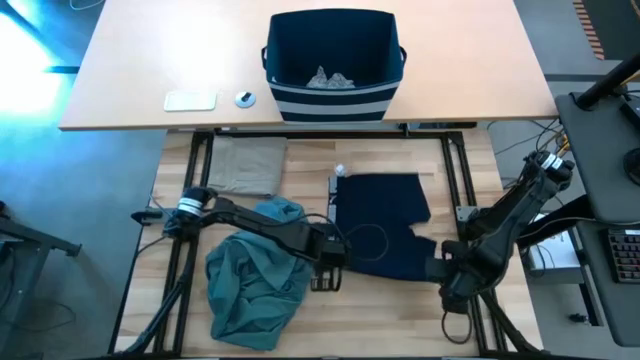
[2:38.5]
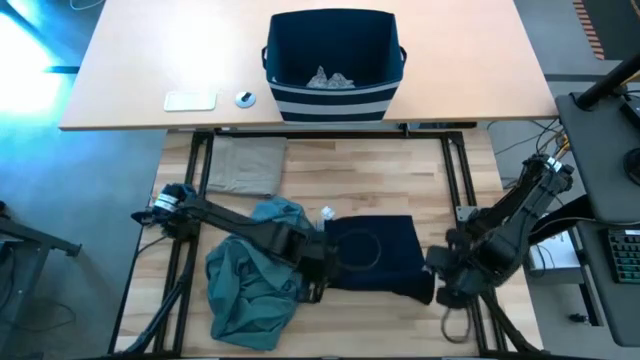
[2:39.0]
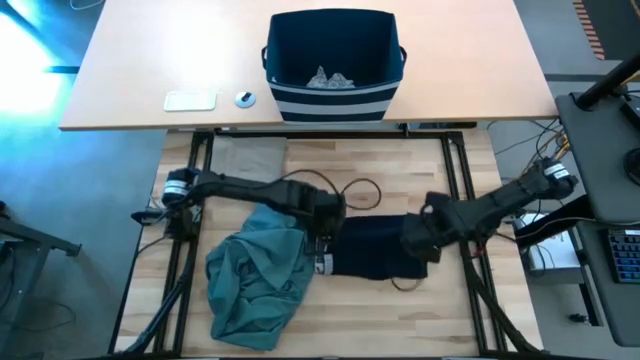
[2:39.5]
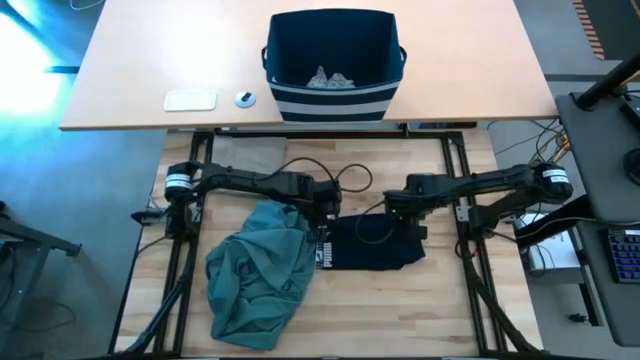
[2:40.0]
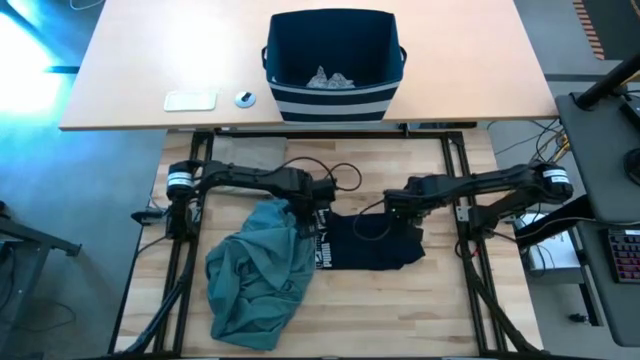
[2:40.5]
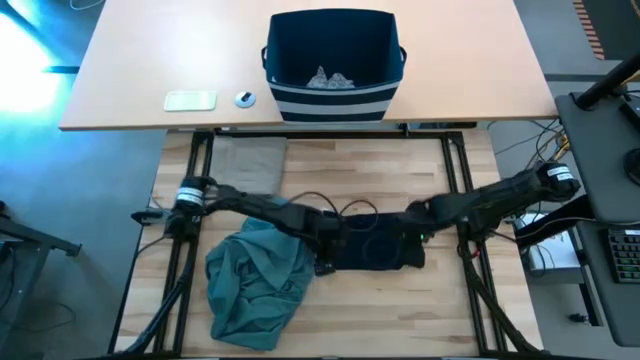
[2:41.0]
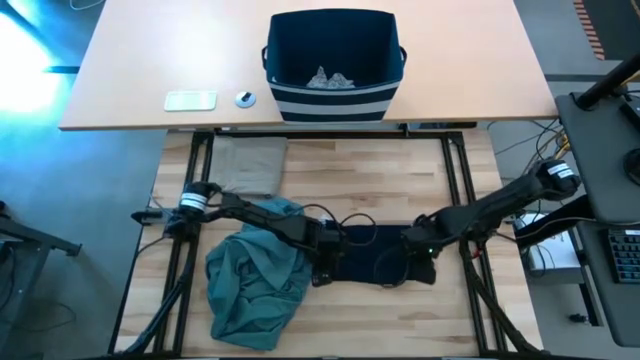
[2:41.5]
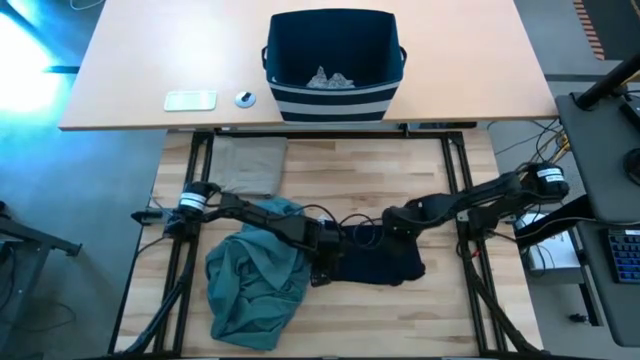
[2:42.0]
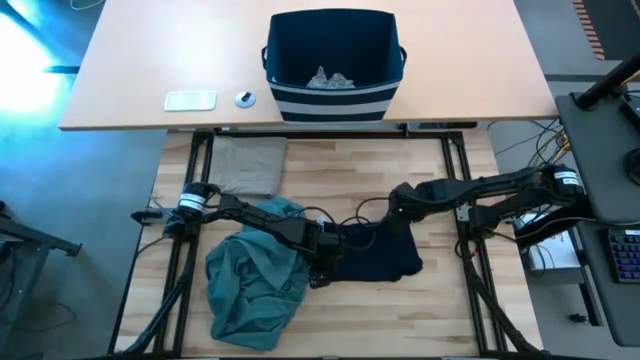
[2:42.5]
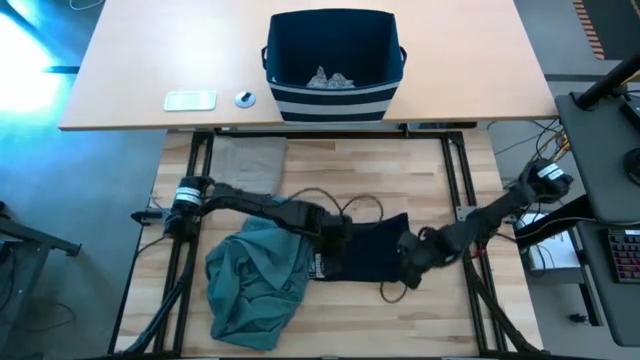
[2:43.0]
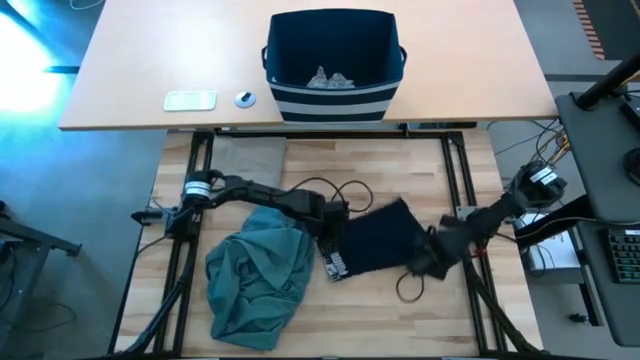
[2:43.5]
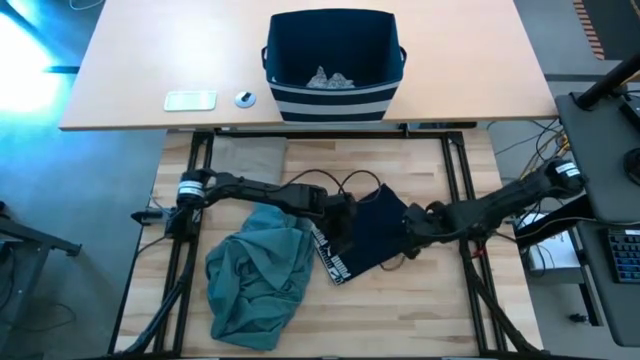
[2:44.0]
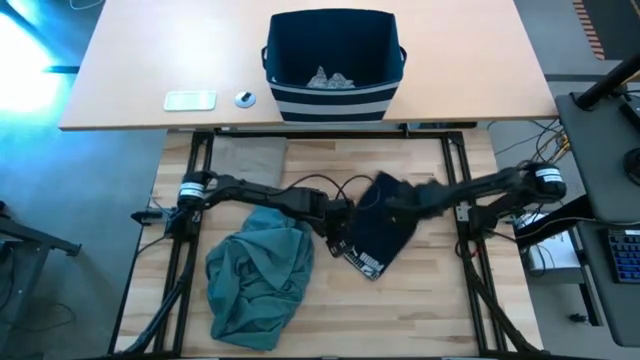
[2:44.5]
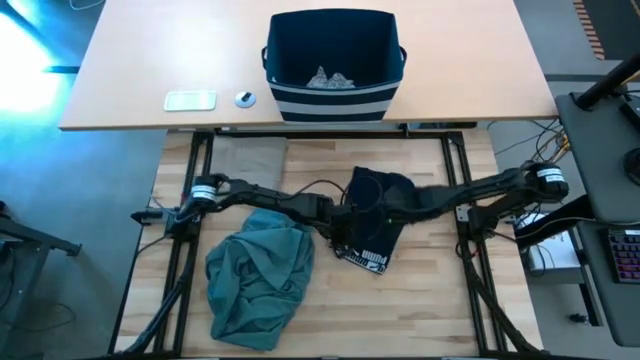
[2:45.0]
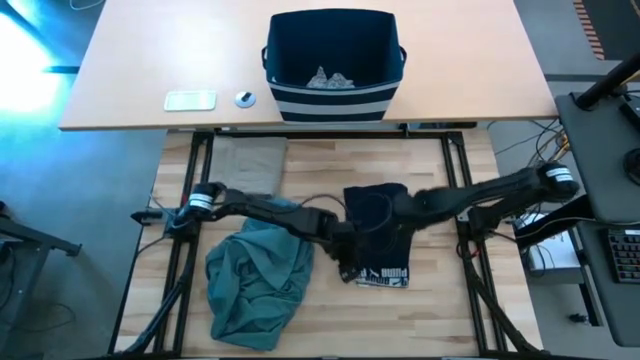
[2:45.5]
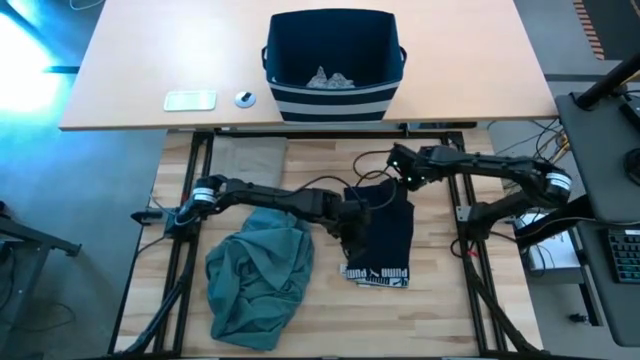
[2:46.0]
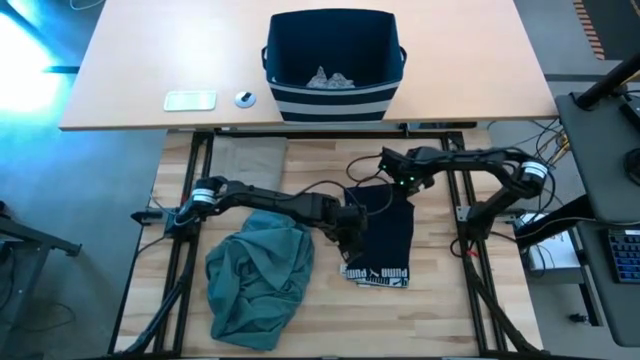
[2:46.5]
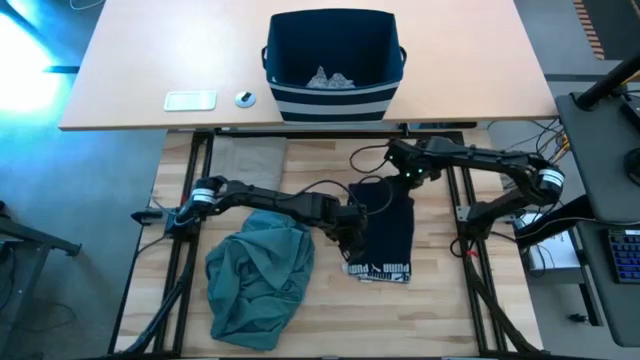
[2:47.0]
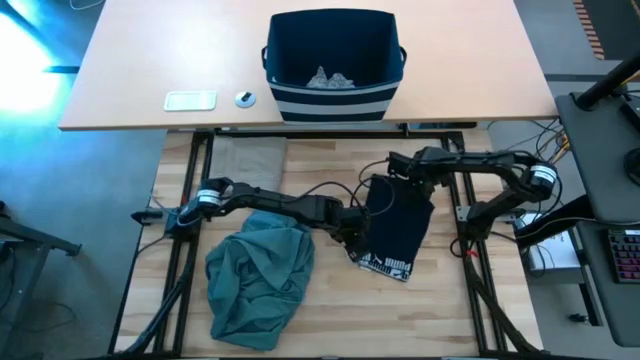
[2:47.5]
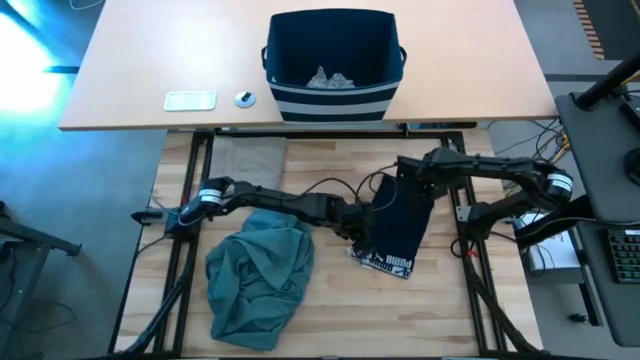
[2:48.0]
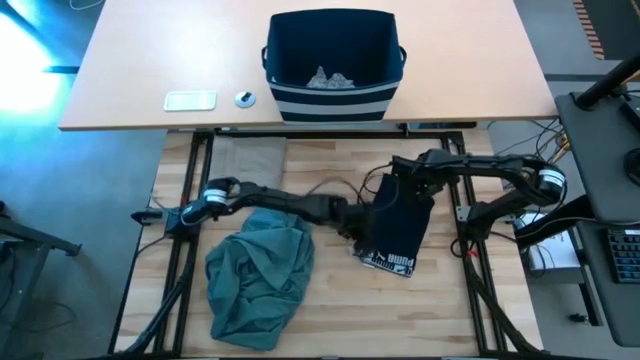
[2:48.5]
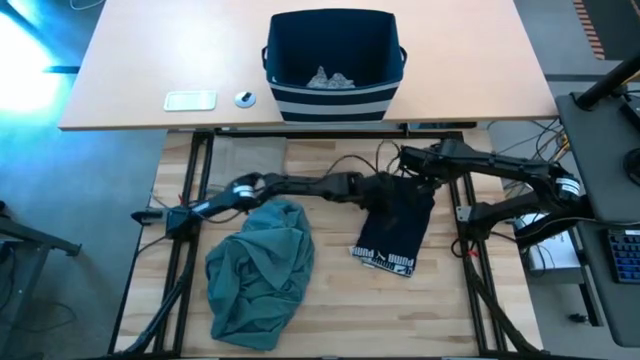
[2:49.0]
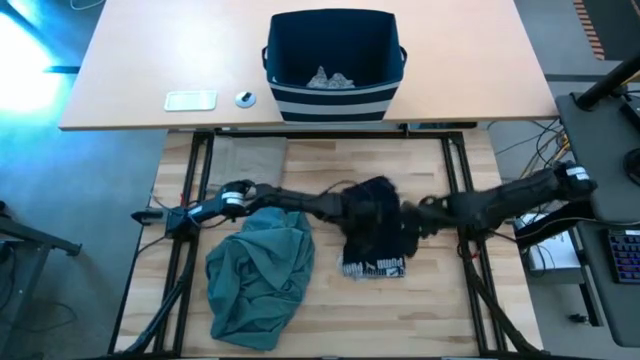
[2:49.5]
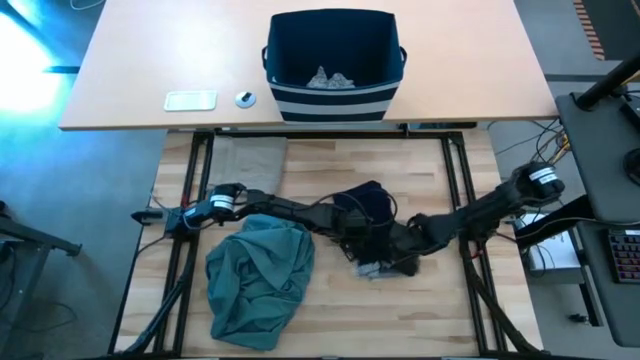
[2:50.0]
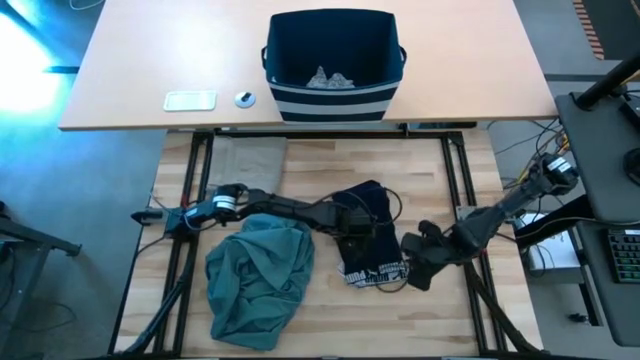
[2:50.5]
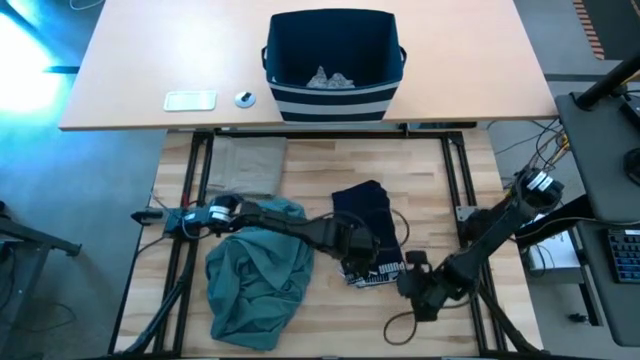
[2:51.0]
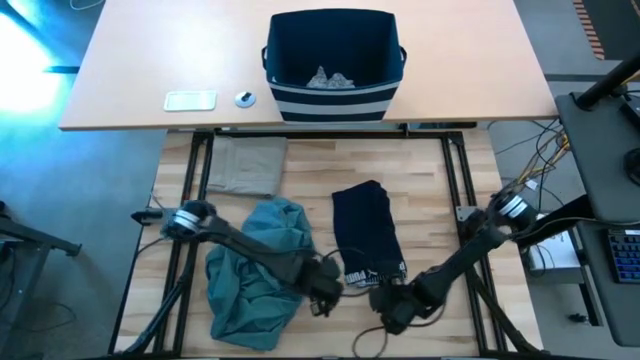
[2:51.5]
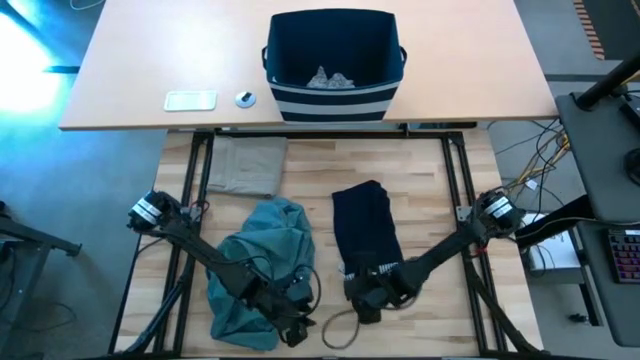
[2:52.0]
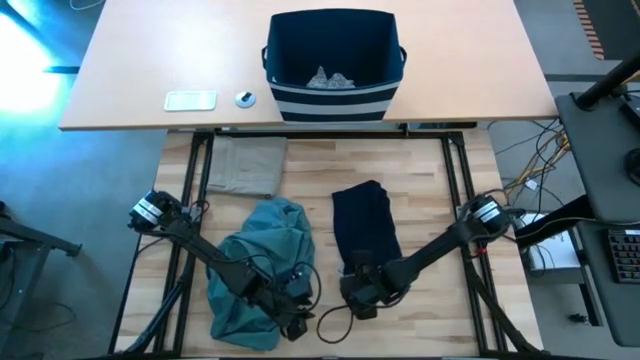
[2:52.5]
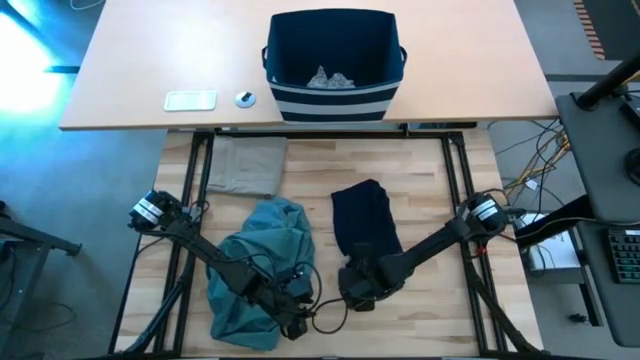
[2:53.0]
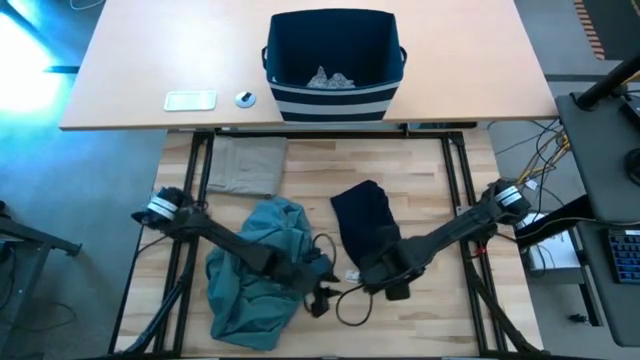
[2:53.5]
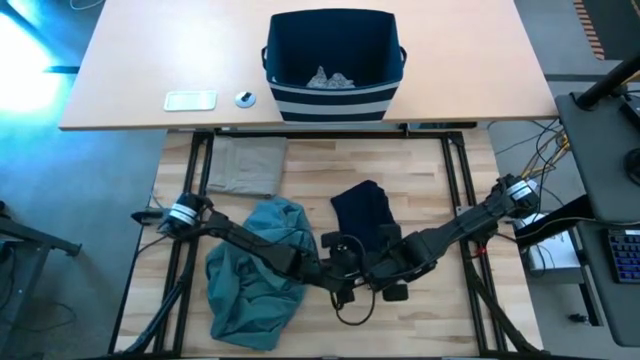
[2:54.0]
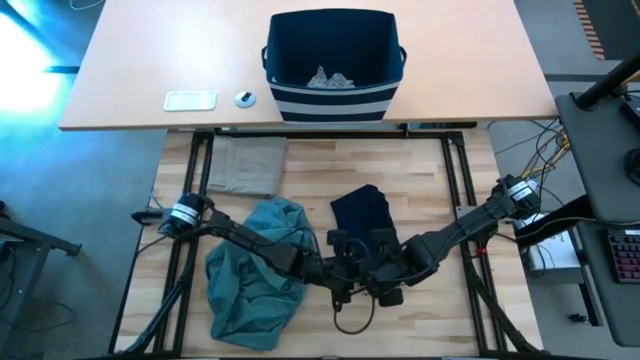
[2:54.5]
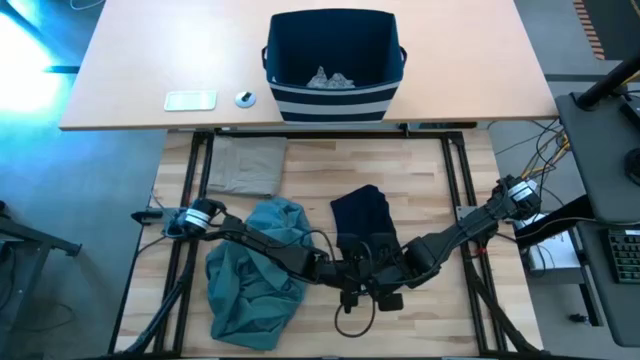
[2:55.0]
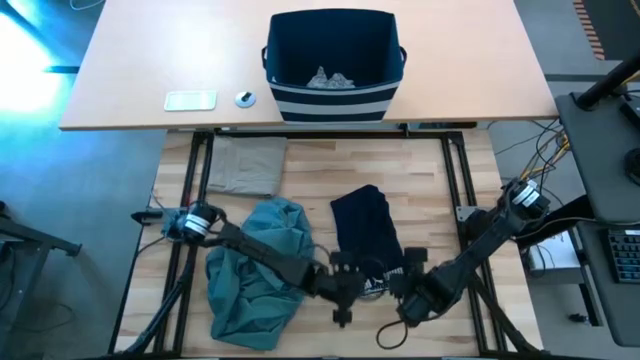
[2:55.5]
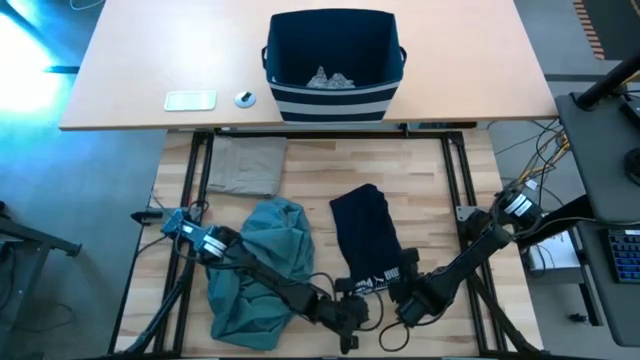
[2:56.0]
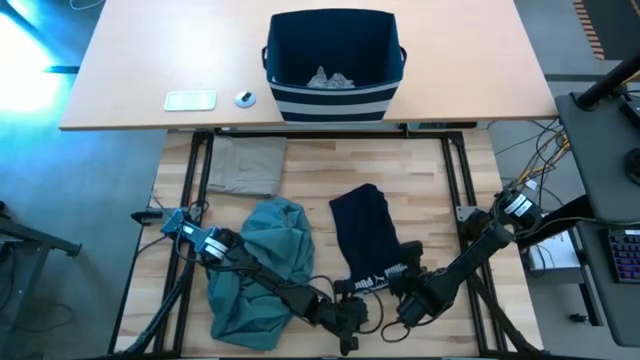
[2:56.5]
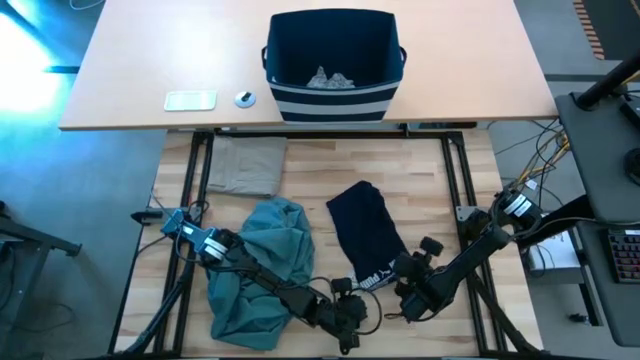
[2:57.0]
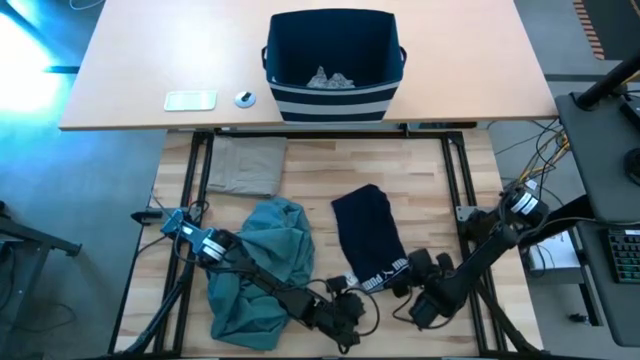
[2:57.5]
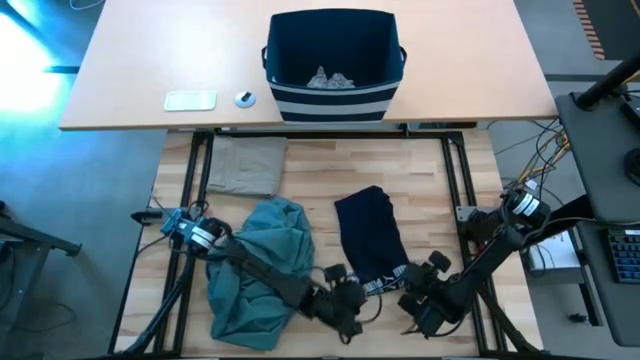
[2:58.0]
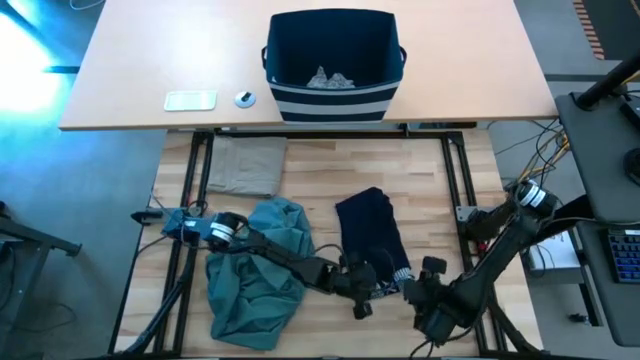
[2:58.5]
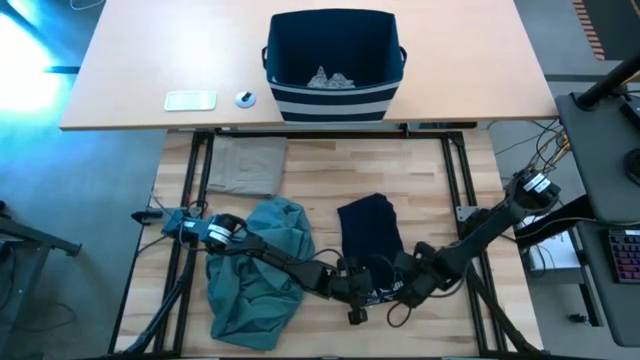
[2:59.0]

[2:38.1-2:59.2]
Task: Fold Laundry from Bin
Fold the black underwear
